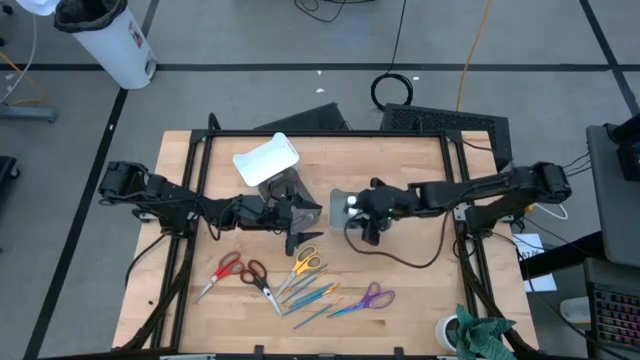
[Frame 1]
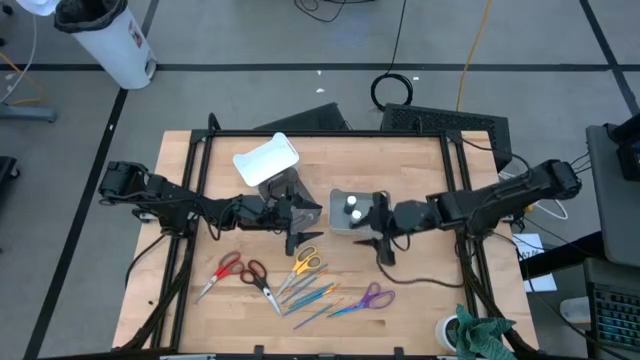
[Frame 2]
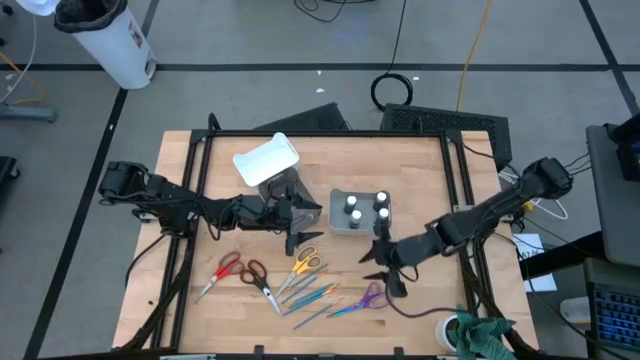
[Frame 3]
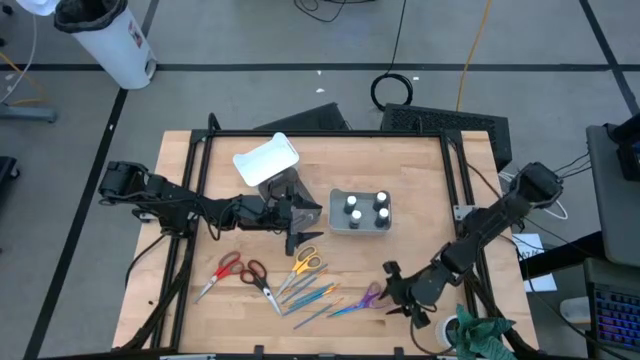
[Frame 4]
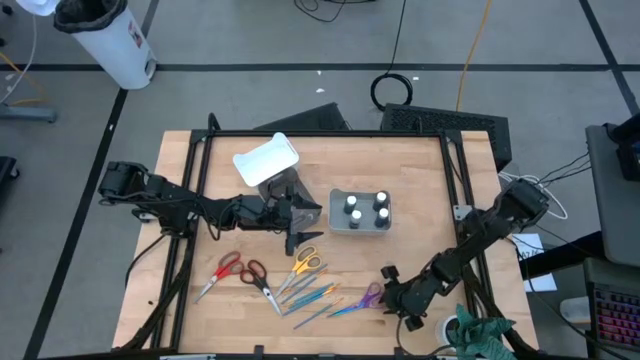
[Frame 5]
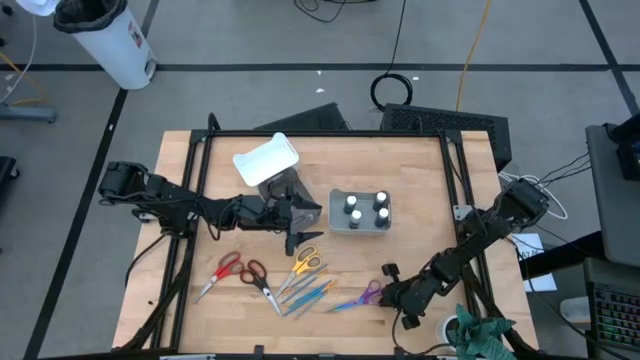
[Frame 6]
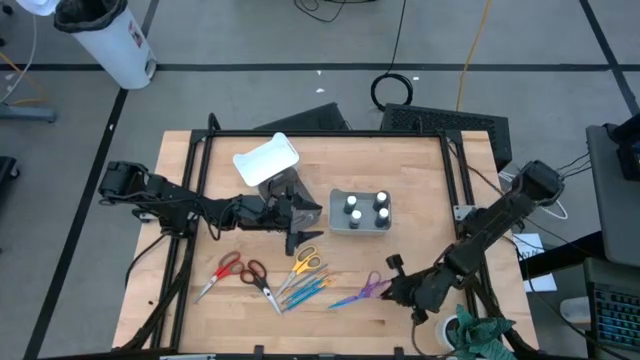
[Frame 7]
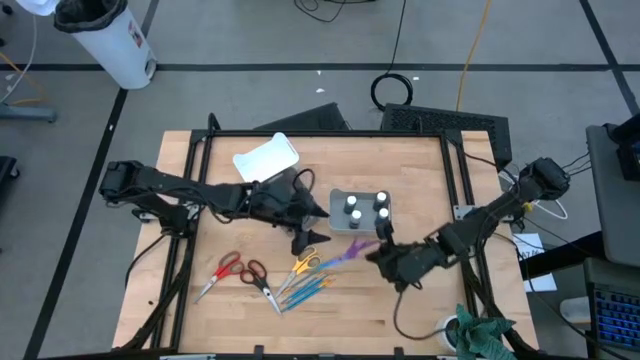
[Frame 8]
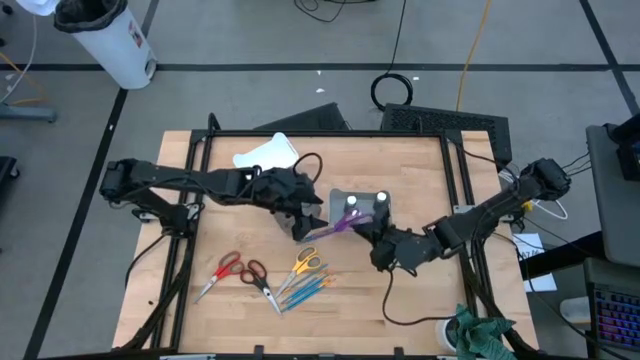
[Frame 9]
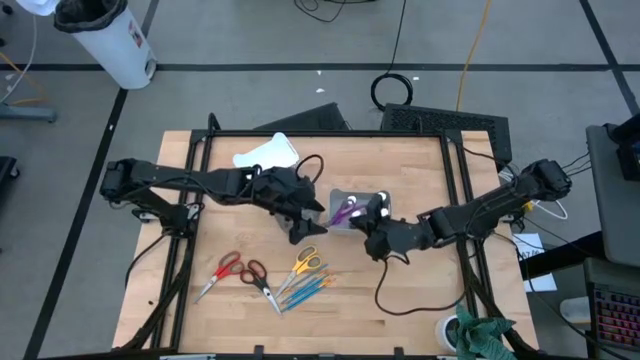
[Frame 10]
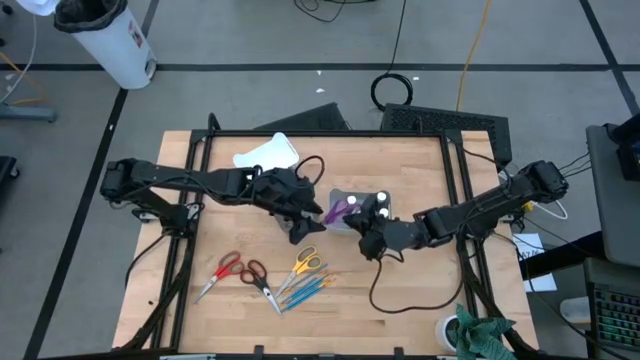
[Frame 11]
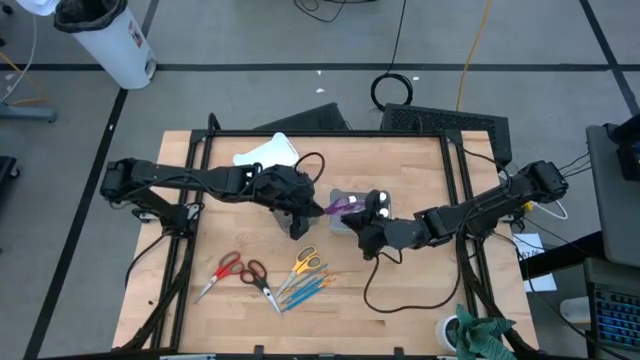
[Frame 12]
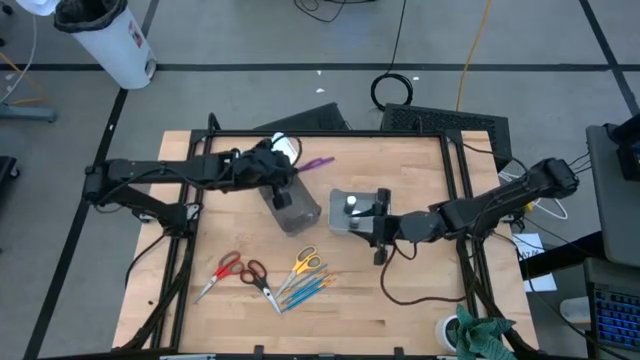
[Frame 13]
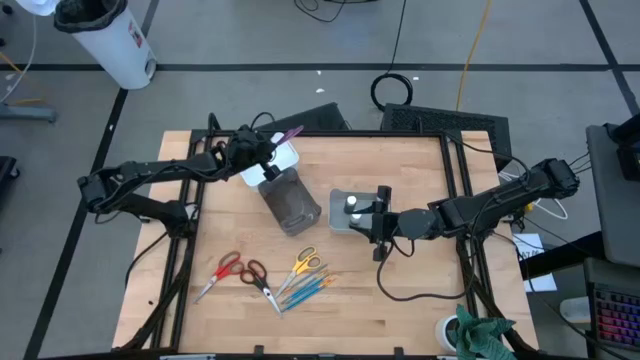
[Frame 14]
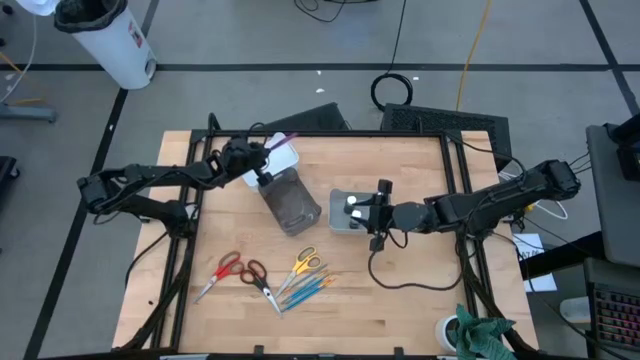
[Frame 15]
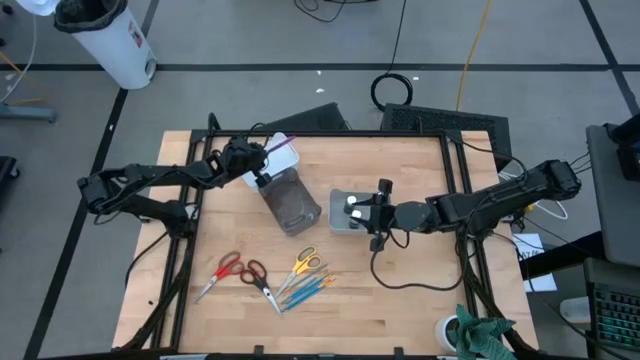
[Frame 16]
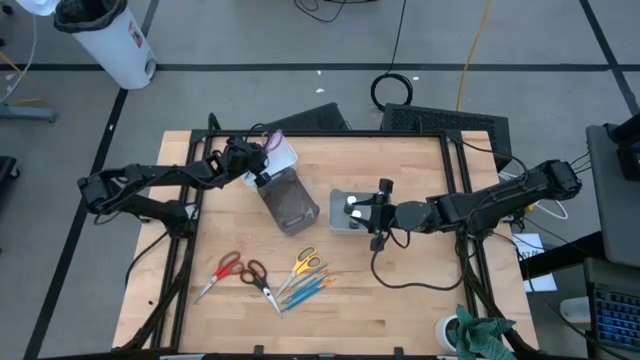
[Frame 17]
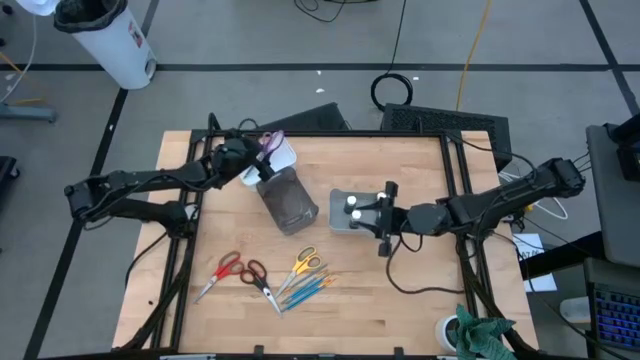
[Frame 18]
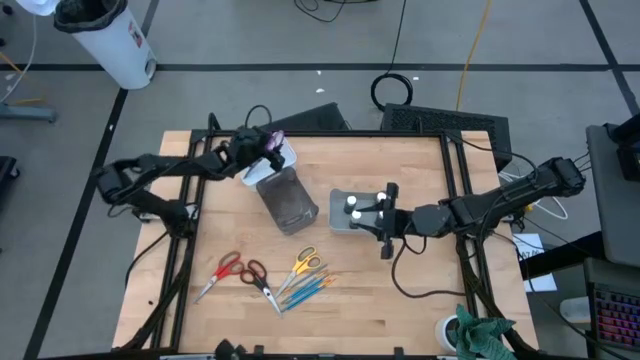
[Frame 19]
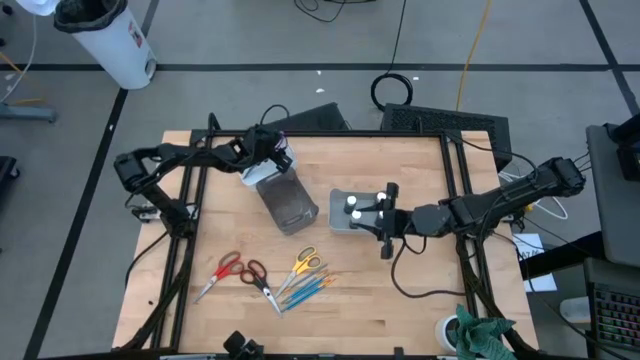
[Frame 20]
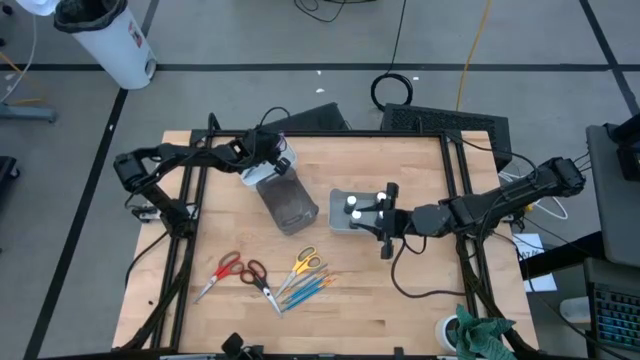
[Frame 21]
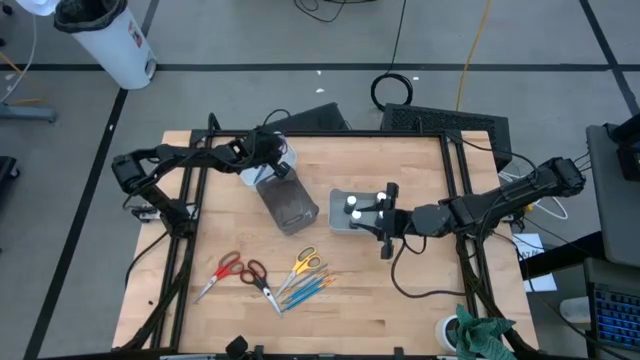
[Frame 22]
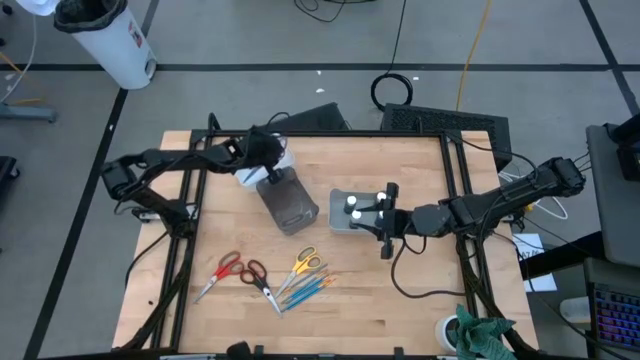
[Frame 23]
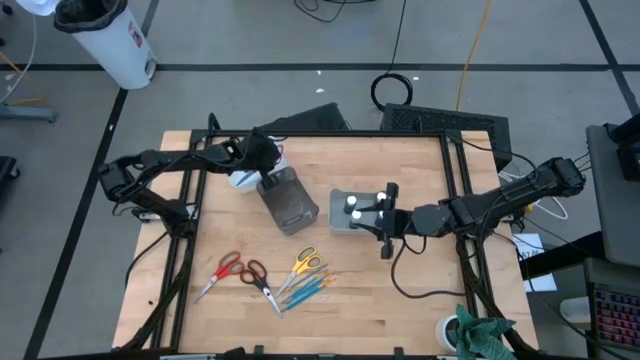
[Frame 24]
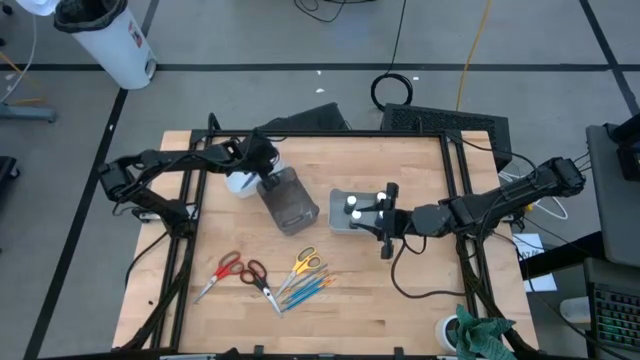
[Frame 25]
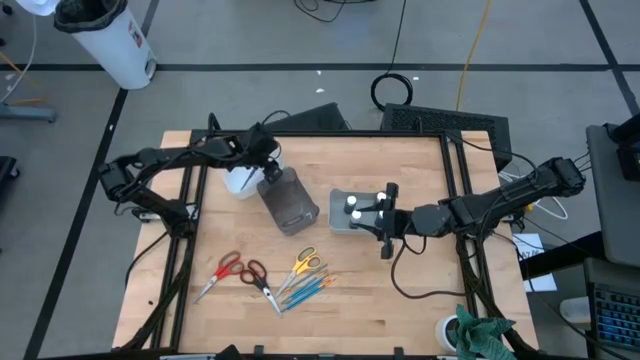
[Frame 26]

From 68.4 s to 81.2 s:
Task: Pick & Place Paint Supplies
Put the purple scissors into the white bin

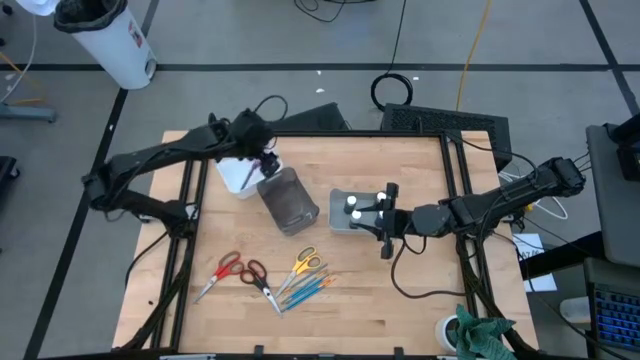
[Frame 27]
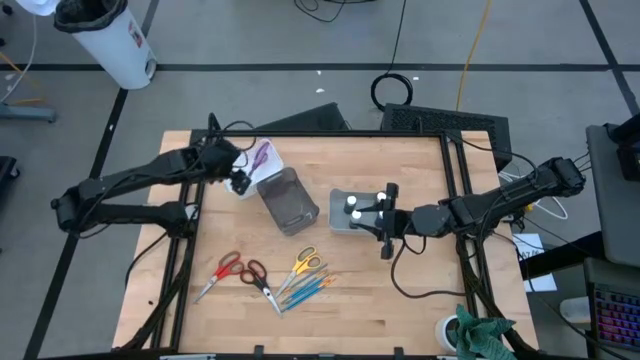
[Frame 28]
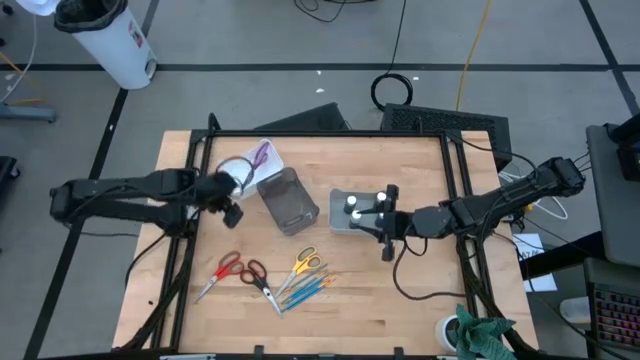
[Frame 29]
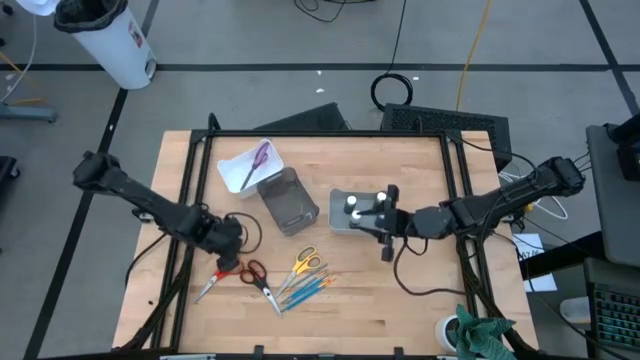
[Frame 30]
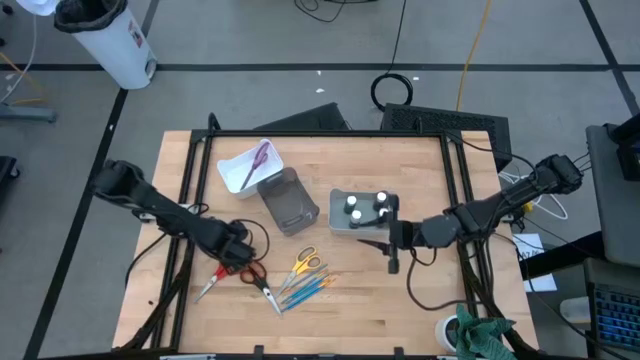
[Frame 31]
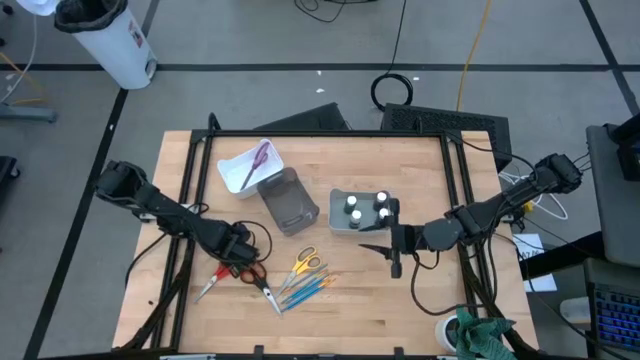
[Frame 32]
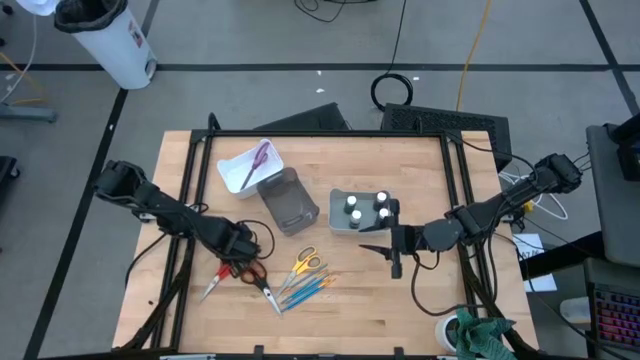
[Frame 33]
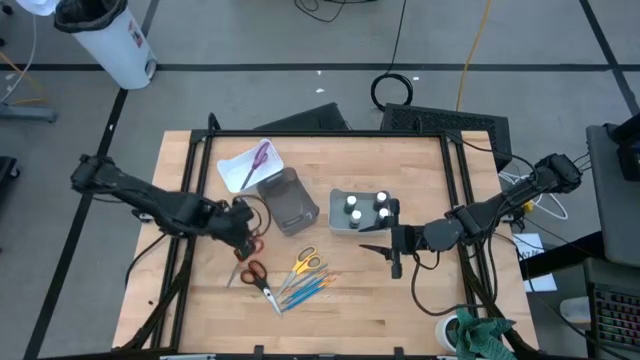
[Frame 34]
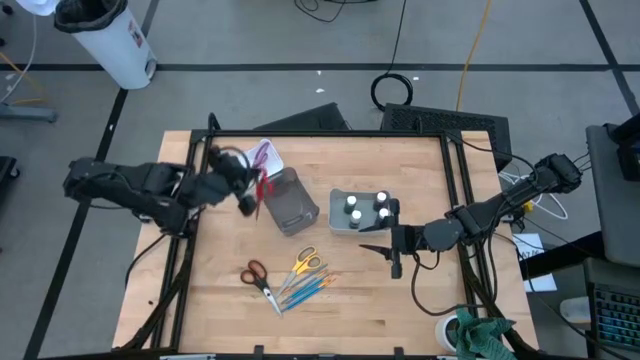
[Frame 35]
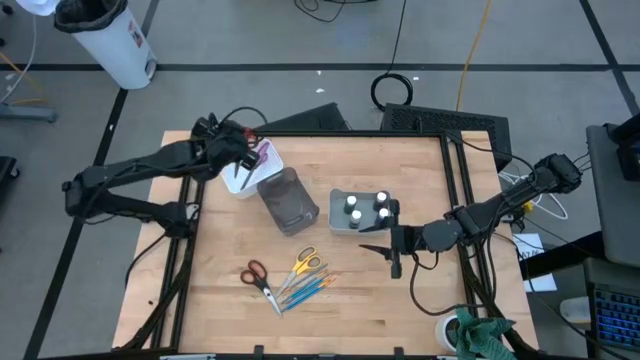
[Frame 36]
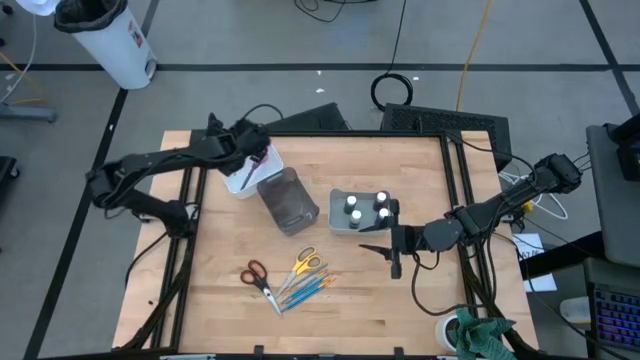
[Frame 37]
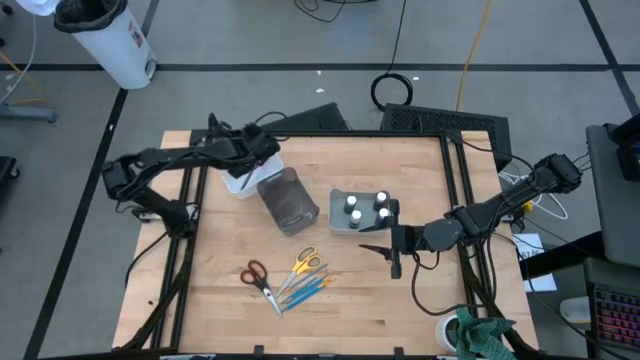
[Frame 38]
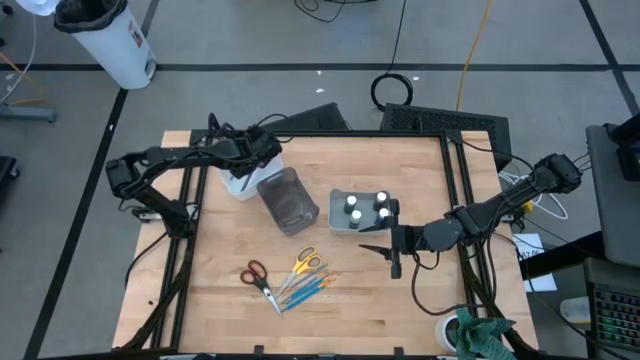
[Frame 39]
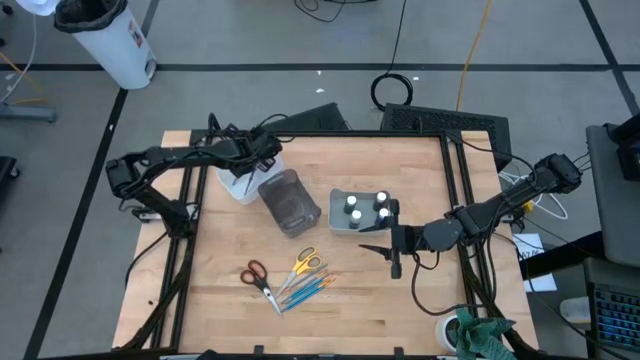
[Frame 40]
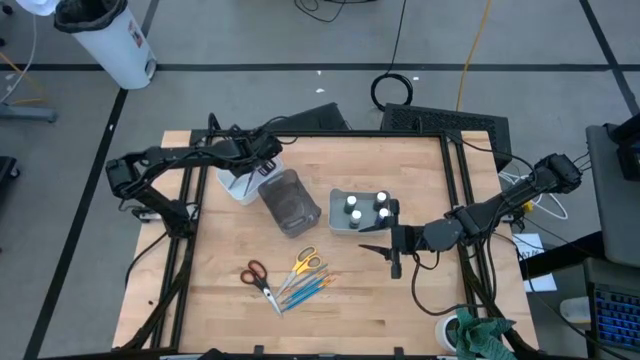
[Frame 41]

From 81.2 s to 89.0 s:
Put the red scissors into the white bin
